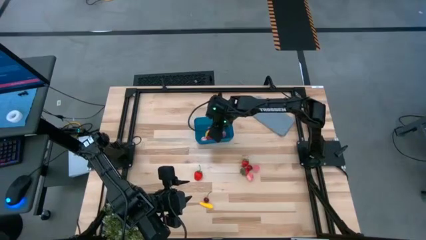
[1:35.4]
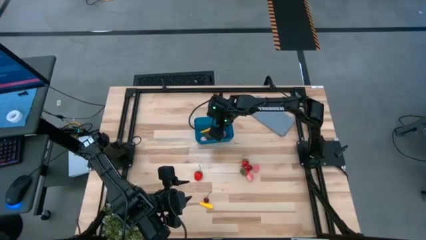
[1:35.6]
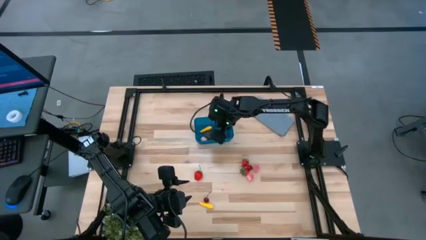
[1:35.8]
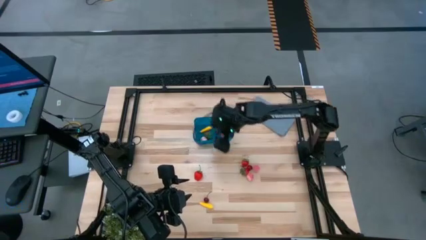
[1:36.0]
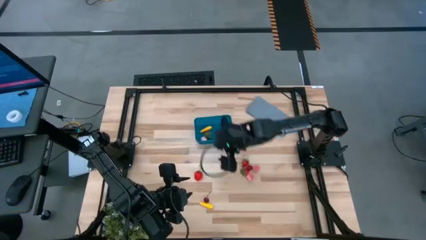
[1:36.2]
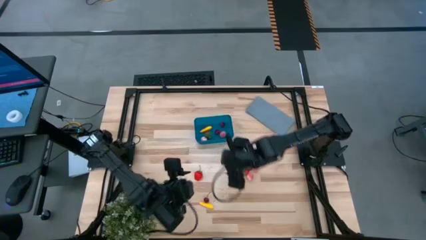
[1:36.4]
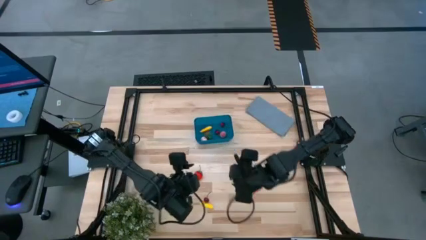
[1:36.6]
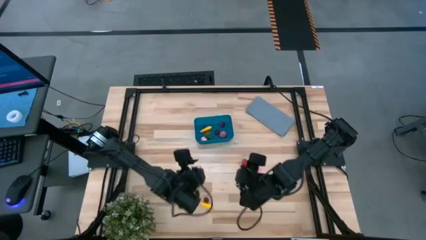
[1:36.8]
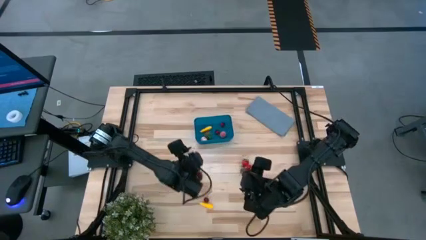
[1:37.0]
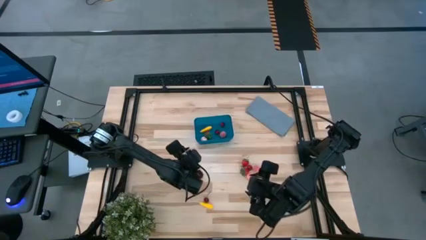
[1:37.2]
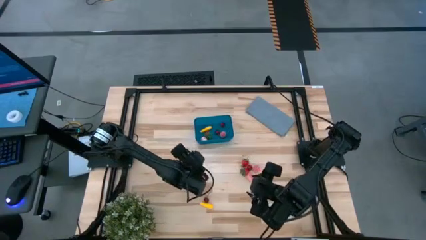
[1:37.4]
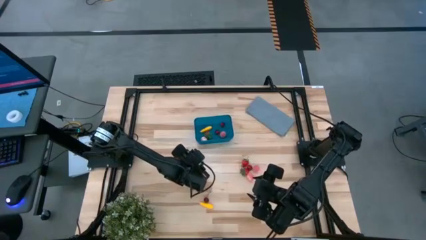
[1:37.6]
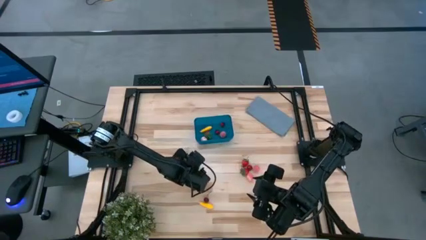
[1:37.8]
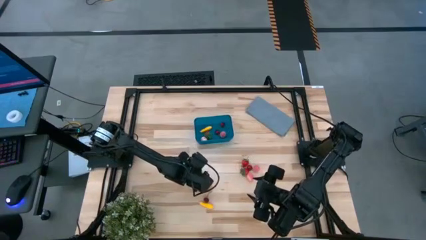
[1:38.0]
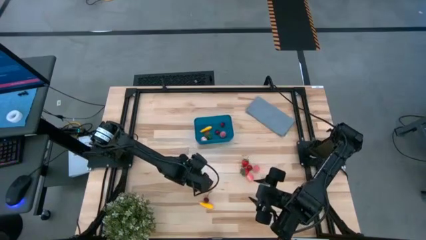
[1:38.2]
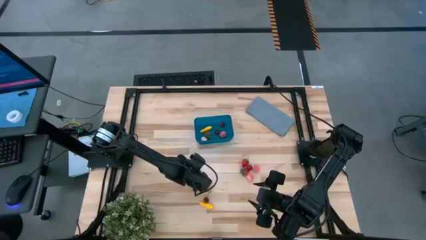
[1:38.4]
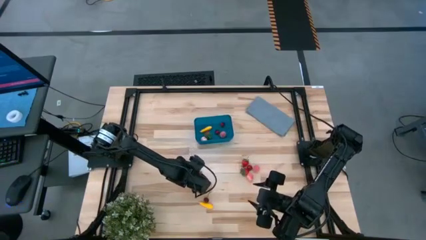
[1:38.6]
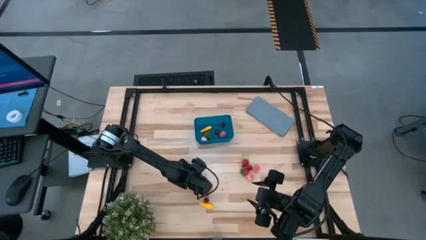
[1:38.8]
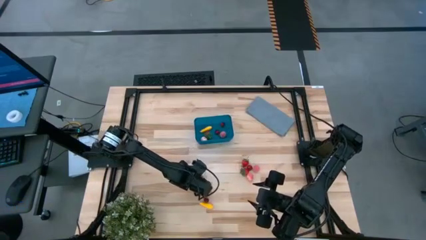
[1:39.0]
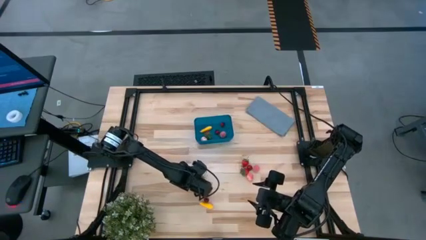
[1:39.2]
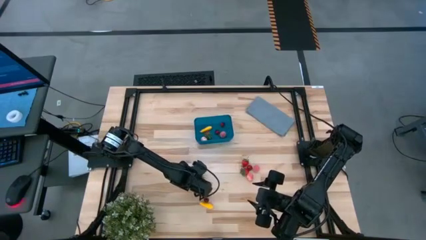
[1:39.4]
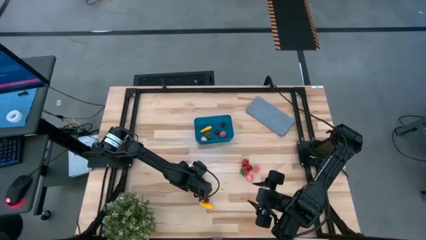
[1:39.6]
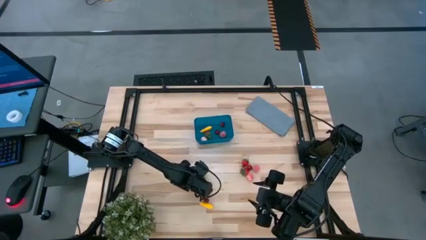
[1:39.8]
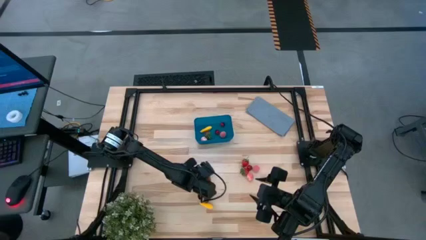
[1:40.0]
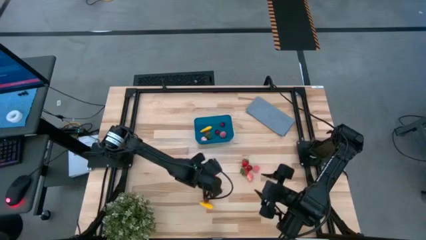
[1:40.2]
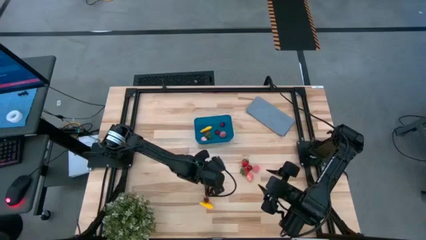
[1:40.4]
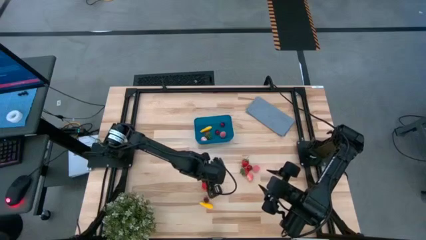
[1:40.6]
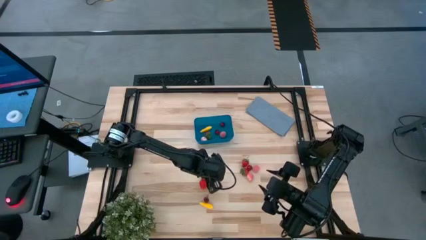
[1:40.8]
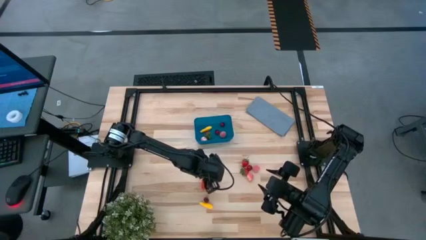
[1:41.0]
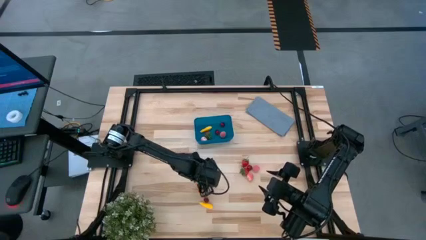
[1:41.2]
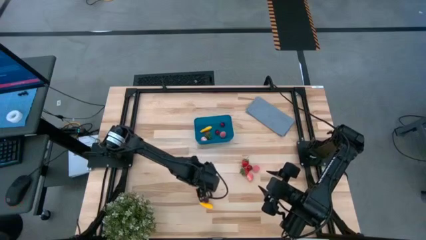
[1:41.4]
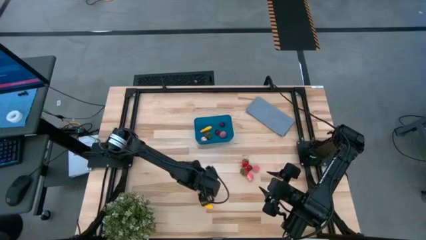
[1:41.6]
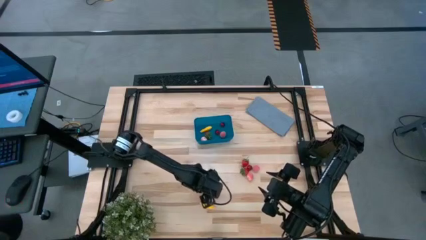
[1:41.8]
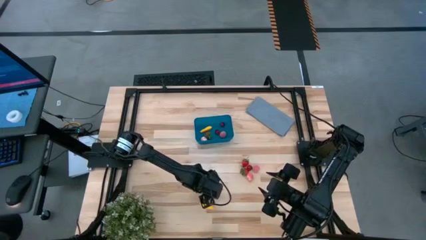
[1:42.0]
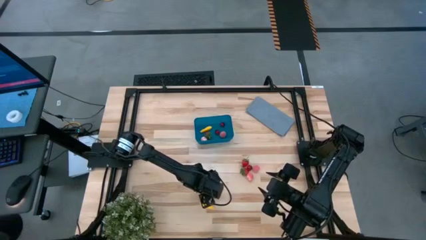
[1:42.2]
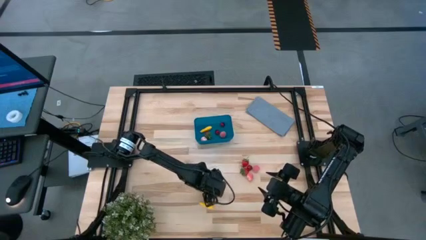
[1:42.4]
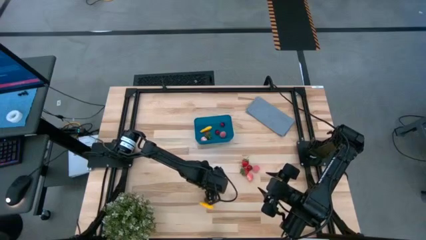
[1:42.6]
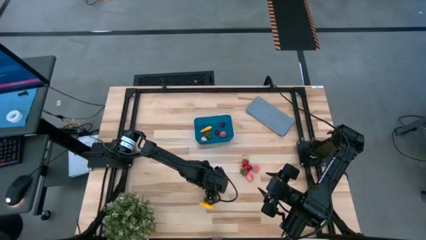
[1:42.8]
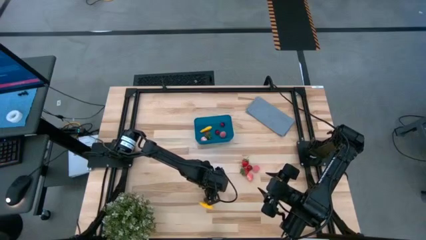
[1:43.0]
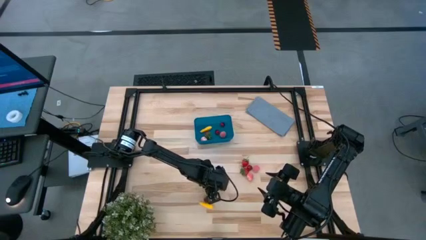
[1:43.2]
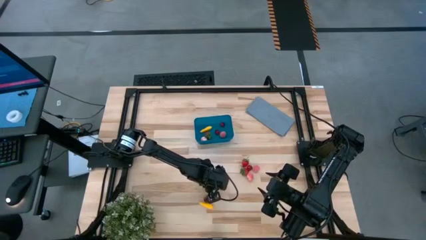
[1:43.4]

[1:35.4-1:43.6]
Task: Pick and placing Produce into tupperware
Put the red strawberry into the blue bin

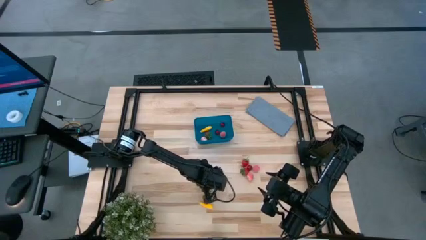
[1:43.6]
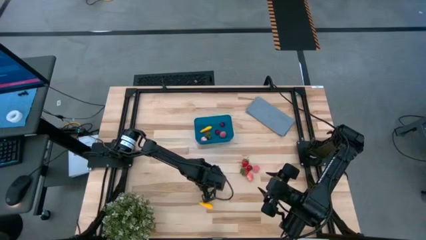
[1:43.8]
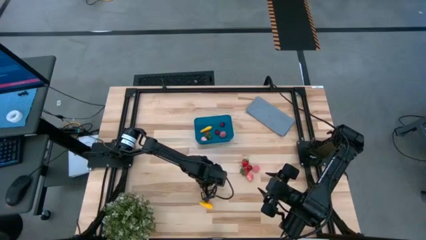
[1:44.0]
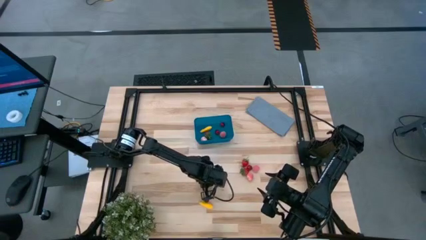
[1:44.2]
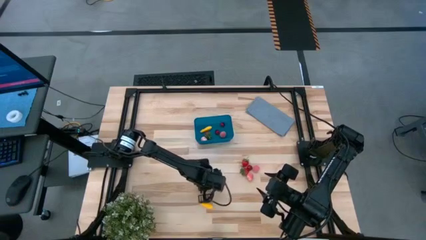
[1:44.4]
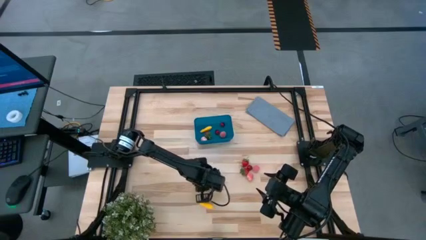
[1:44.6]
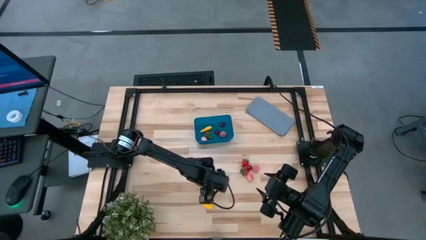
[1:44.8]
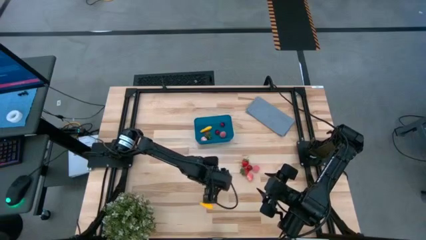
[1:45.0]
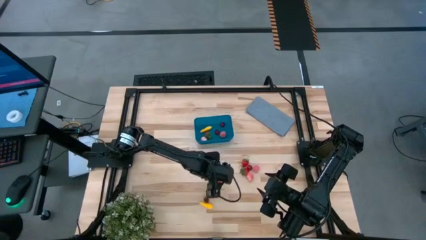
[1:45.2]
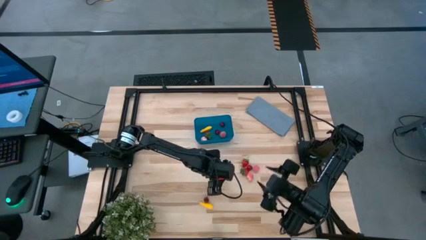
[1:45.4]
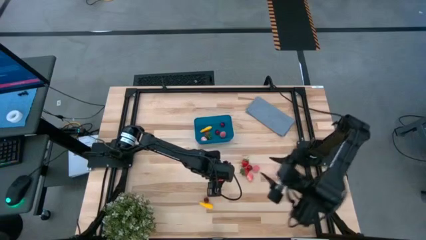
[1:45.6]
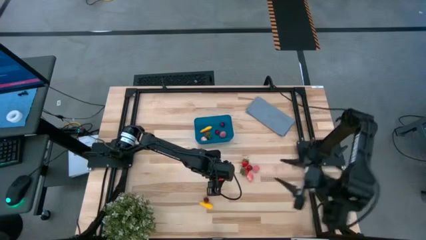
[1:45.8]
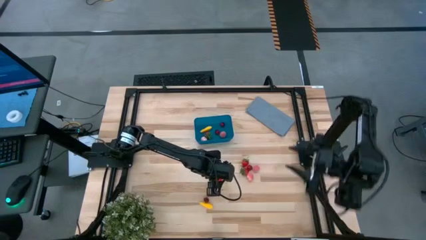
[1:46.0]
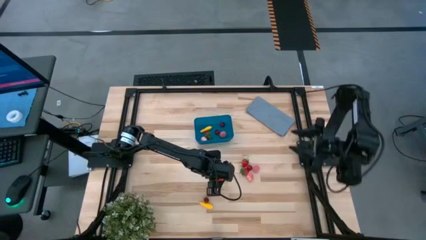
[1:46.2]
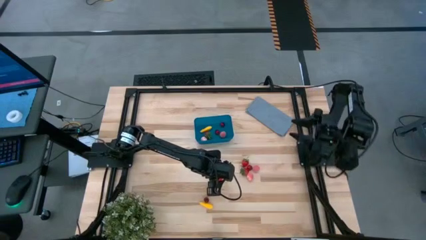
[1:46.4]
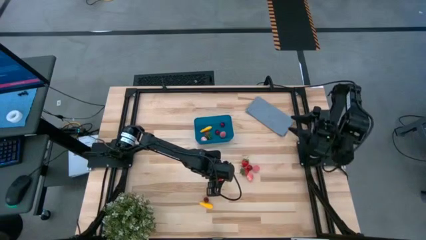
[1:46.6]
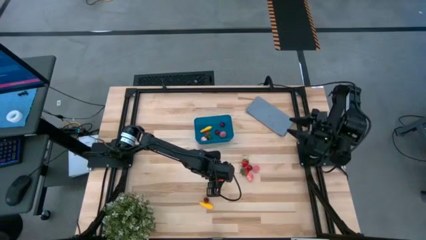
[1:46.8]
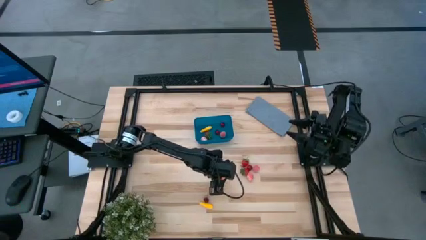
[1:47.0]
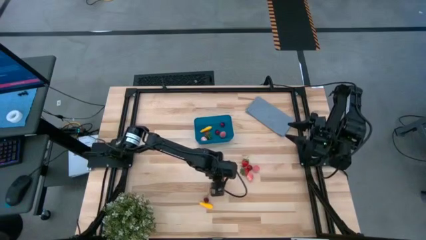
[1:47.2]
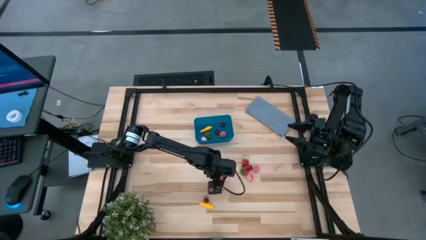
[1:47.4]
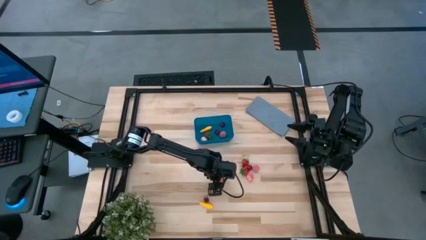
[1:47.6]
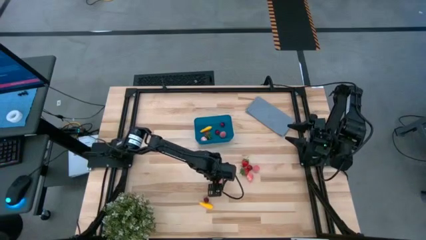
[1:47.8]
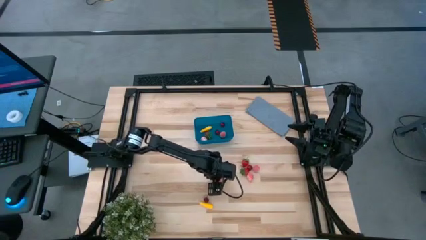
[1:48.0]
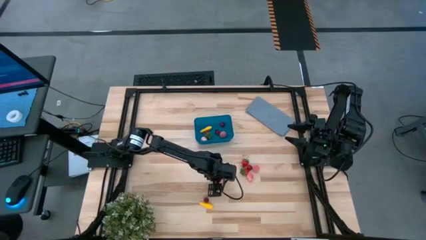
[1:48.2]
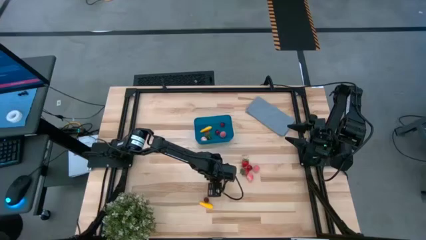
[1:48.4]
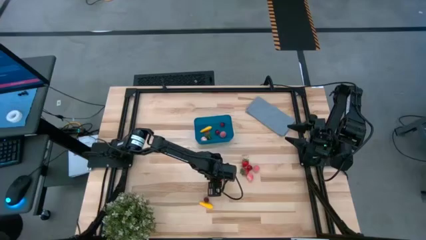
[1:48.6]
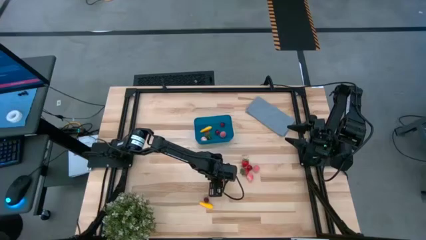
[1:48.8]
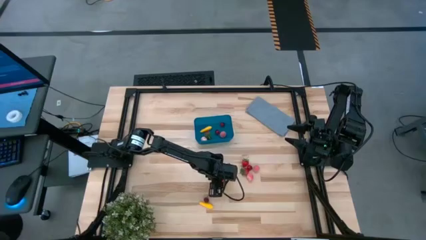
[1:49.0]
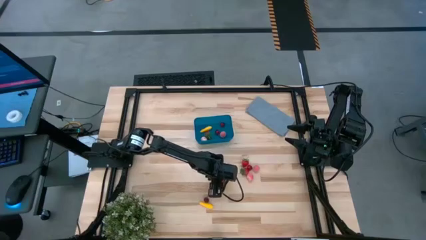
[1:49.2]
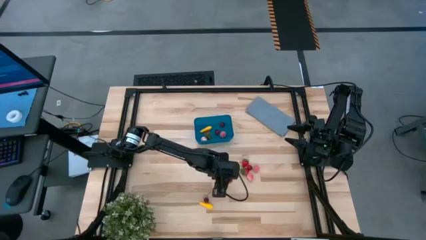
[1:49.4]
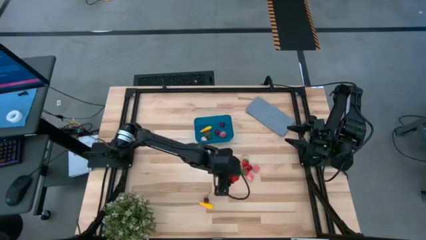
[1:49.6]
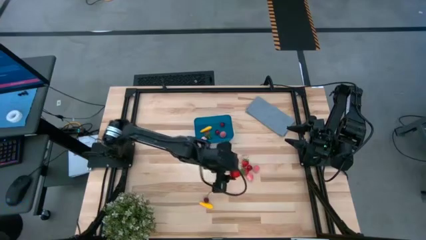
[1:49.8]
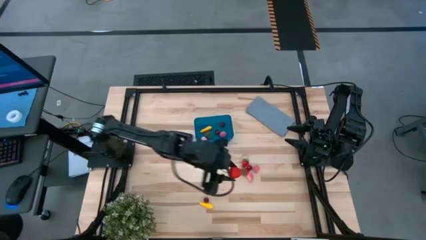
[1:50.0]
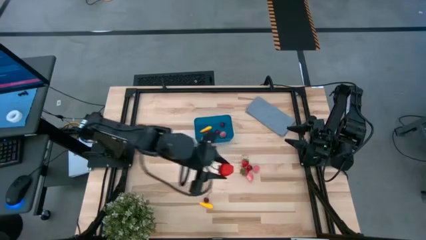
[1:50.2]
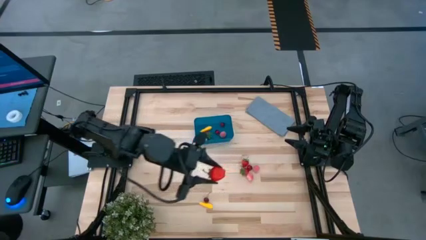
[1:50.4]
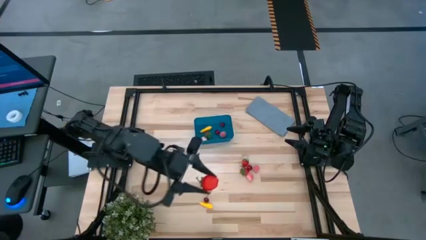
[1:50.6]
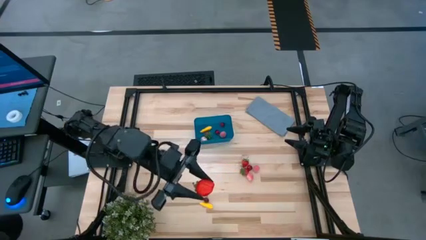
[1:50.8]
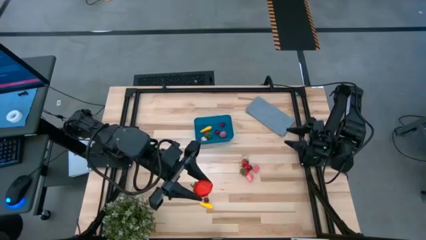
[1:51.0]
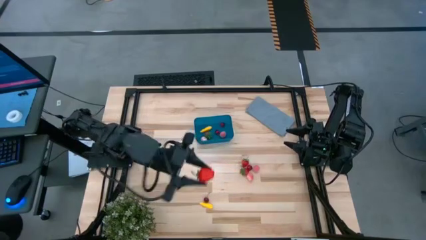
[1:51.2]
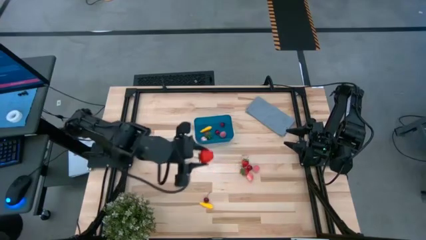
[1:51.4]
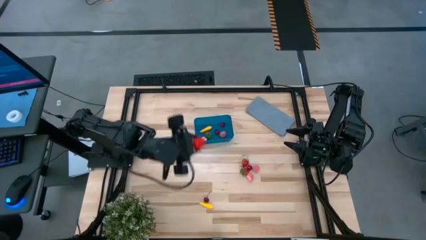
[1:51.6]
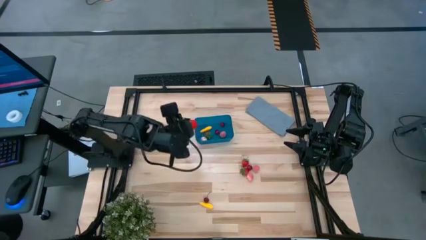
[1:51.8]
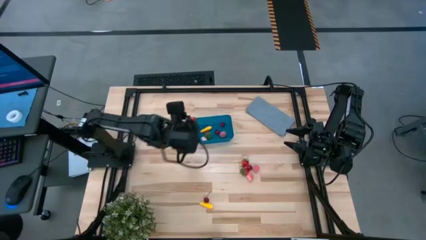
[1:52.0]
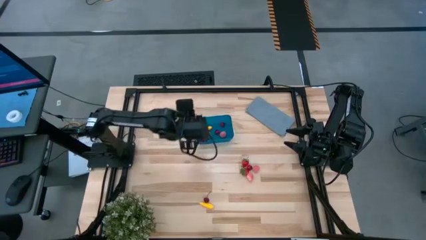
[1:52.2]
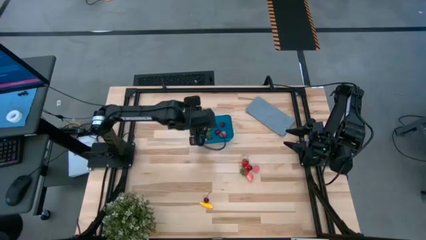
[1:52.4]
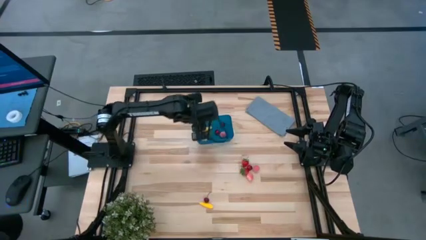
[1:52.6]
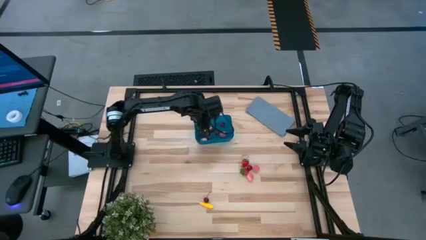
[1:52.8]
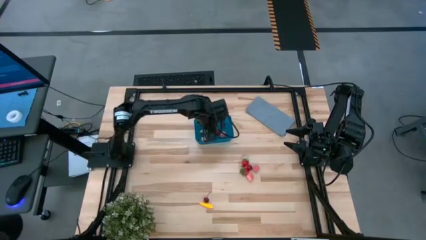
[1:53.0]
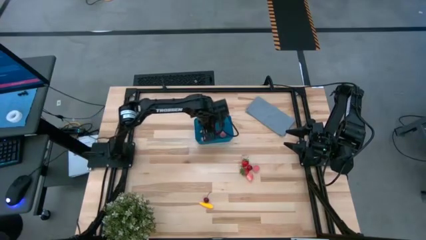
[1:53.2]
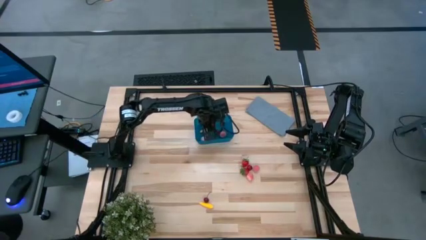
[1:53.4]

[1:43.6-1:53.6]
Put the red strawberry into the blue bin
